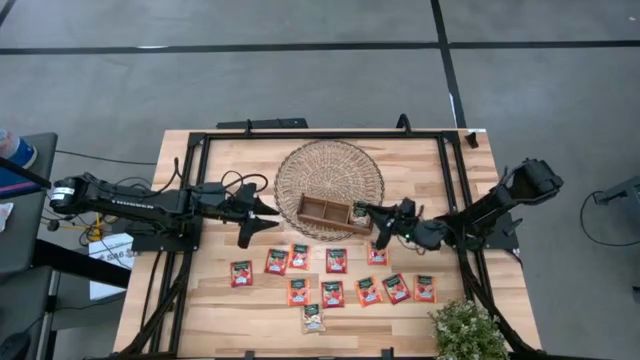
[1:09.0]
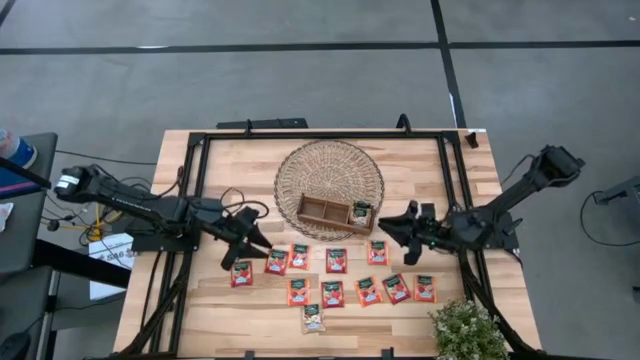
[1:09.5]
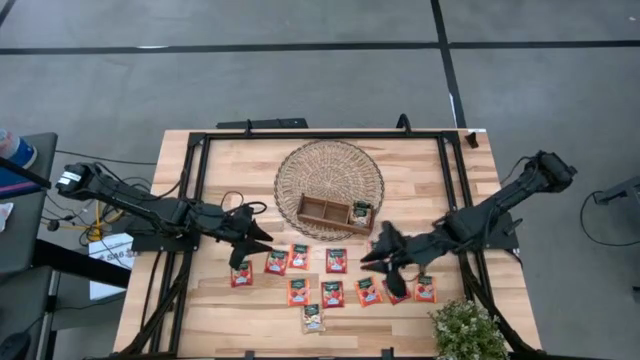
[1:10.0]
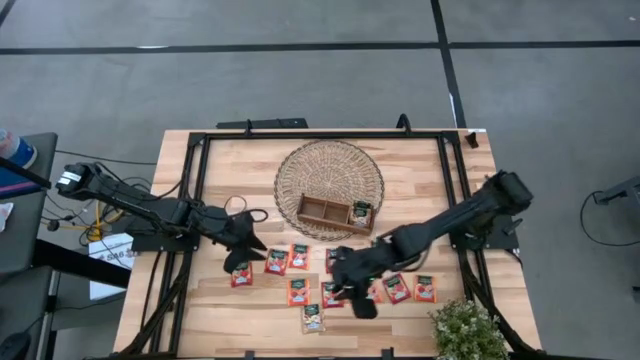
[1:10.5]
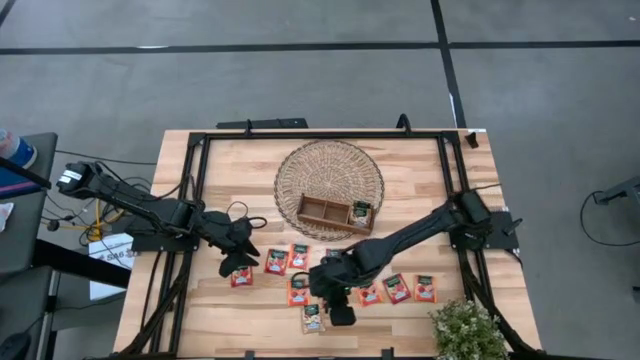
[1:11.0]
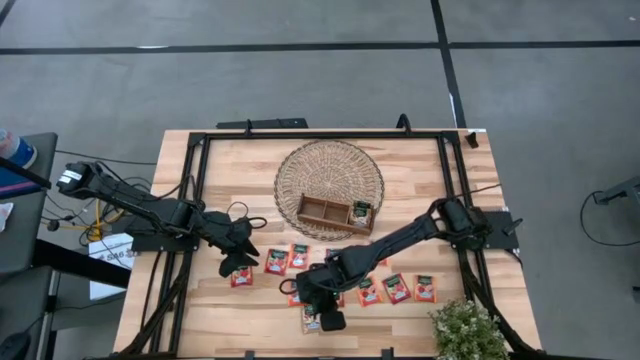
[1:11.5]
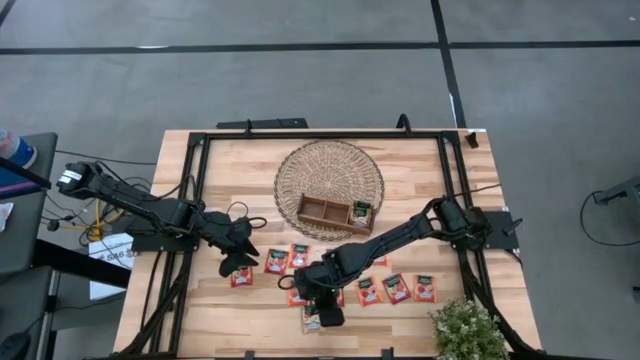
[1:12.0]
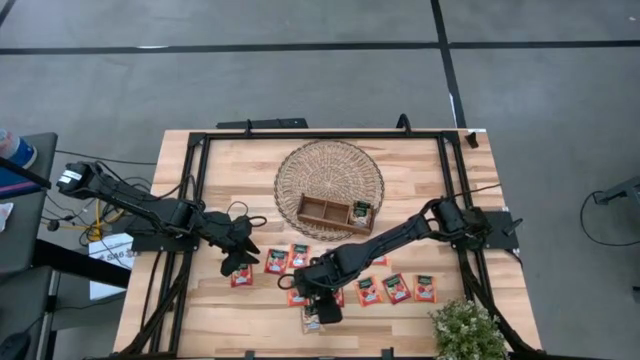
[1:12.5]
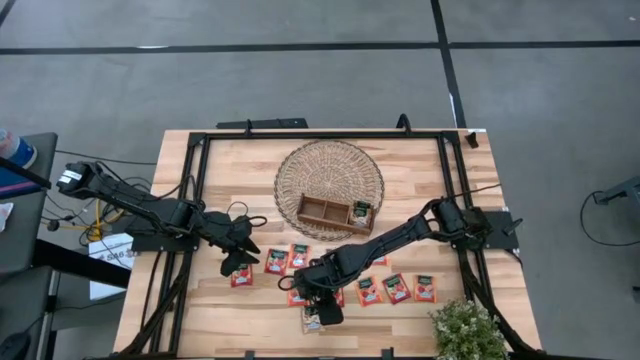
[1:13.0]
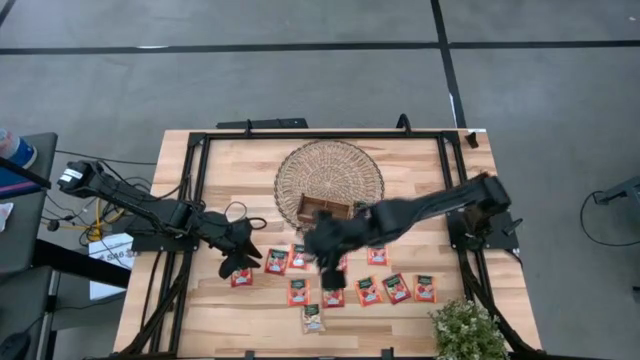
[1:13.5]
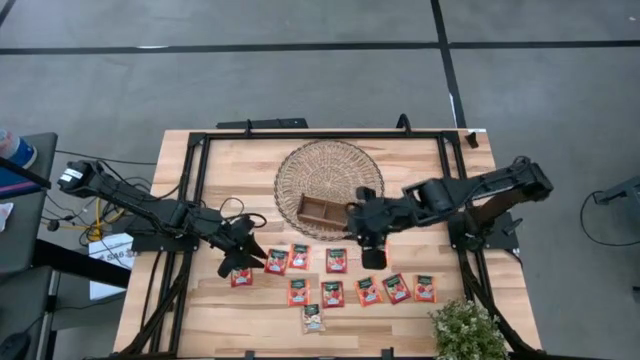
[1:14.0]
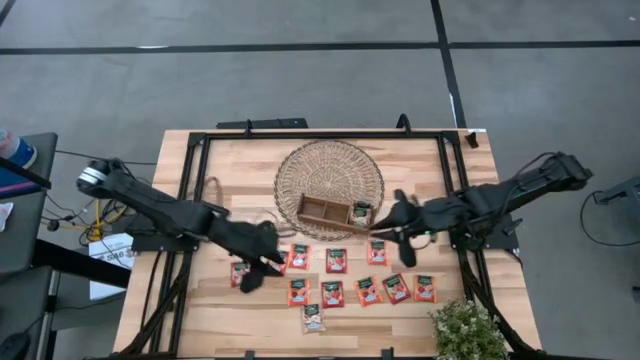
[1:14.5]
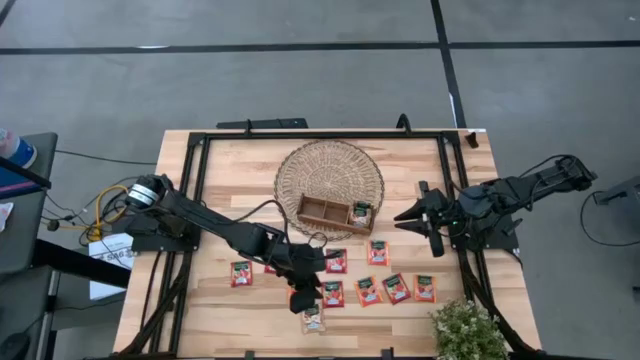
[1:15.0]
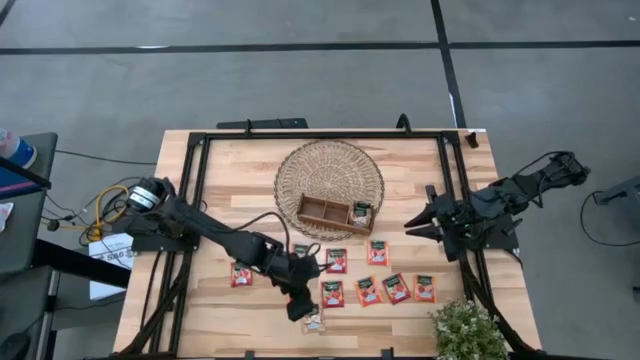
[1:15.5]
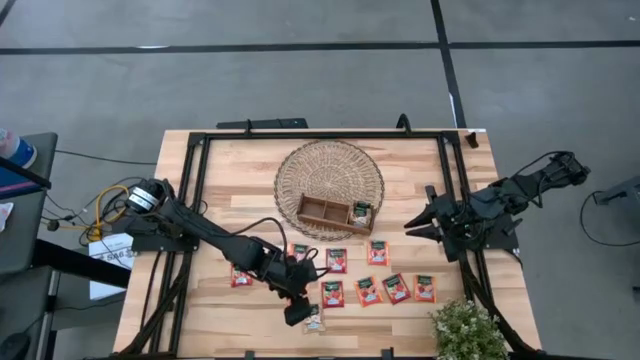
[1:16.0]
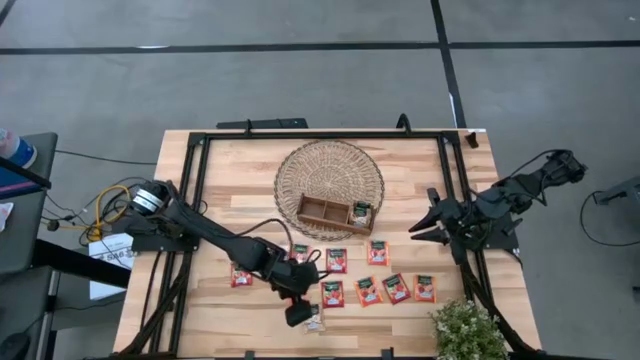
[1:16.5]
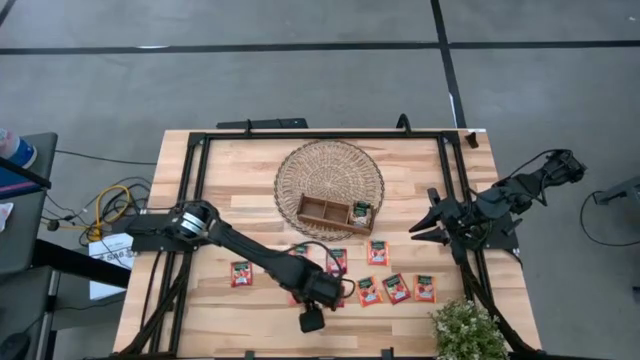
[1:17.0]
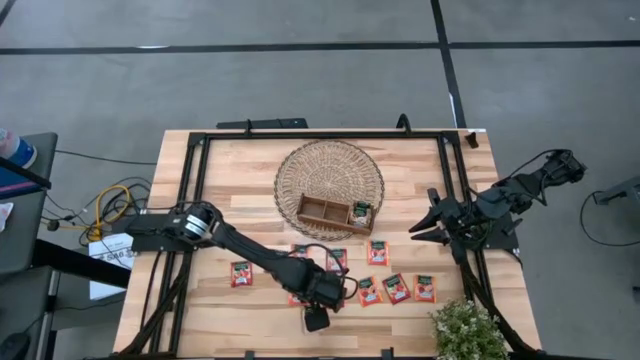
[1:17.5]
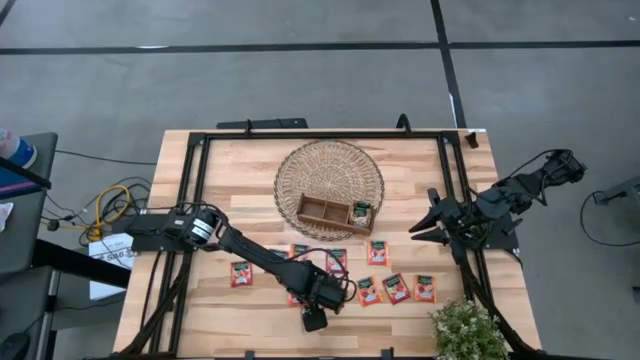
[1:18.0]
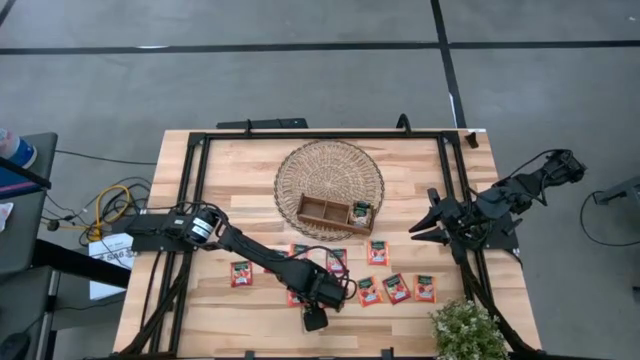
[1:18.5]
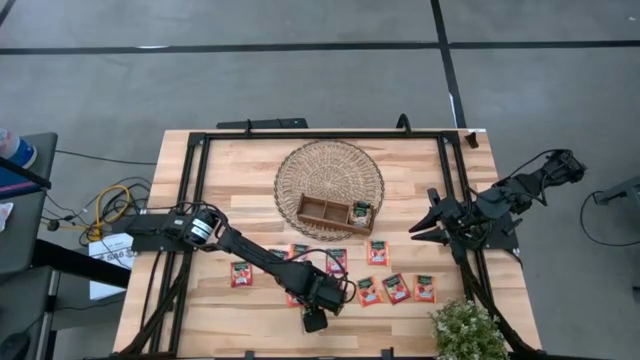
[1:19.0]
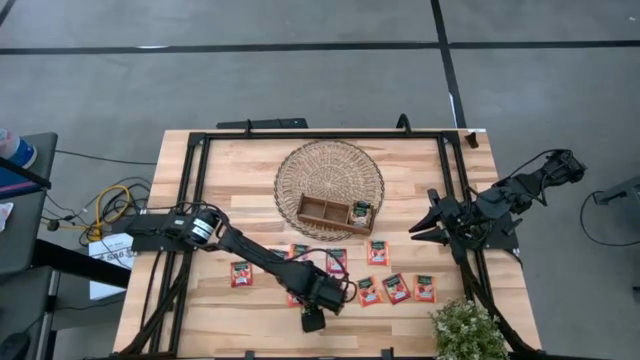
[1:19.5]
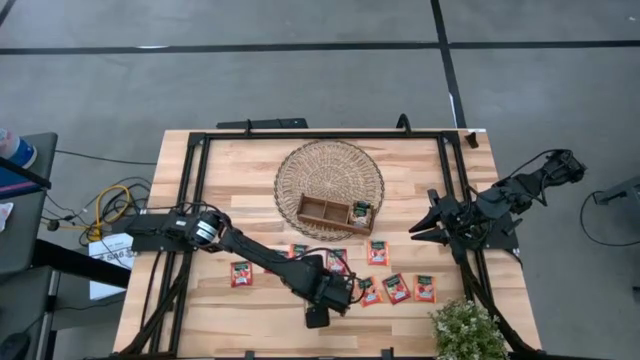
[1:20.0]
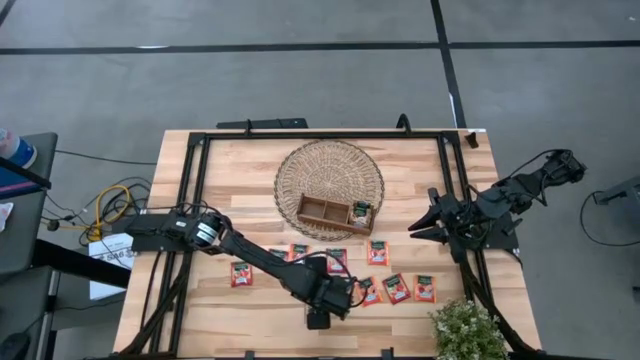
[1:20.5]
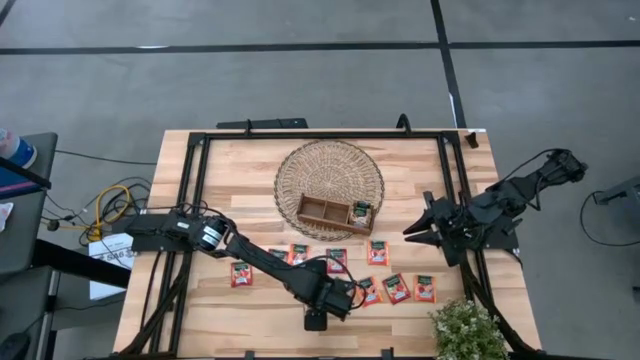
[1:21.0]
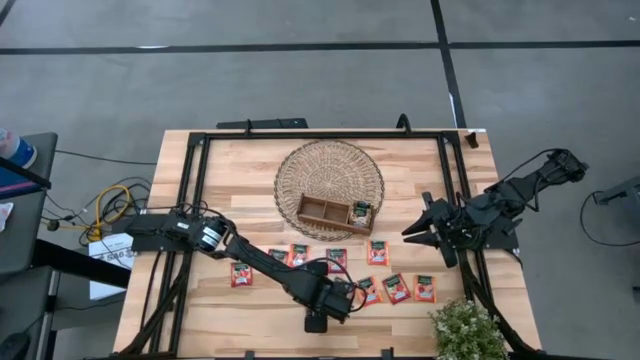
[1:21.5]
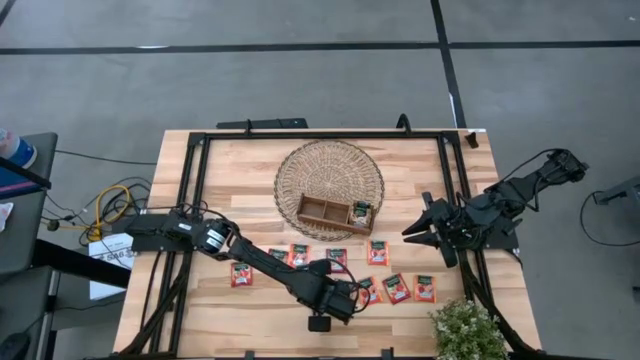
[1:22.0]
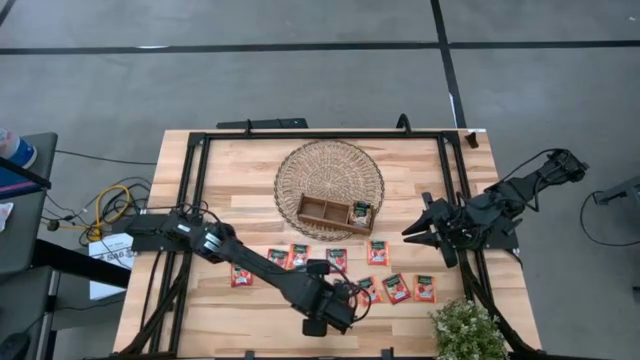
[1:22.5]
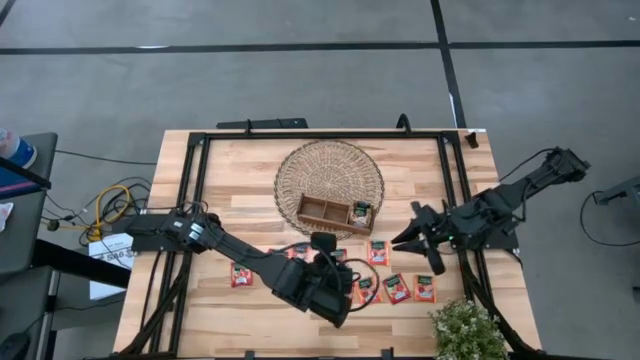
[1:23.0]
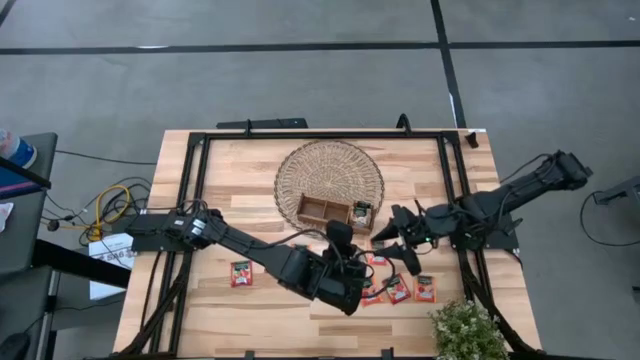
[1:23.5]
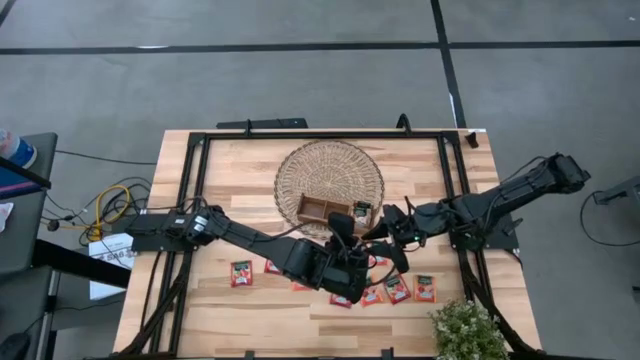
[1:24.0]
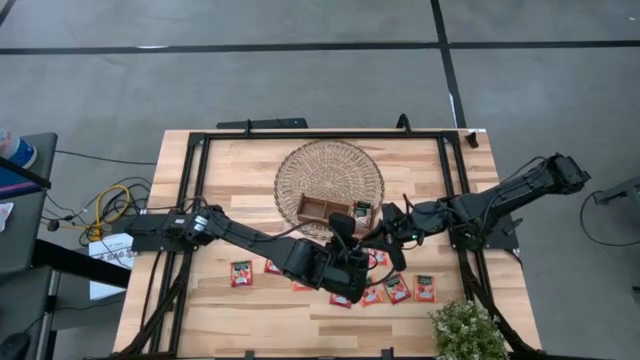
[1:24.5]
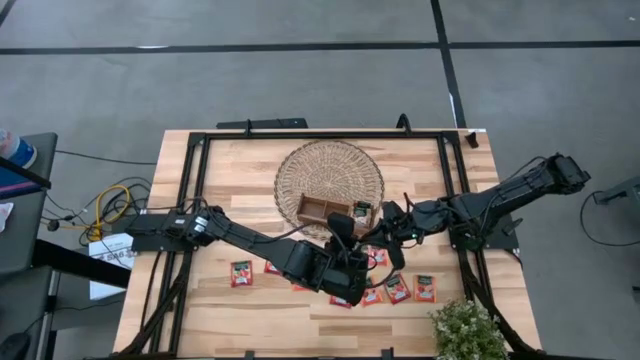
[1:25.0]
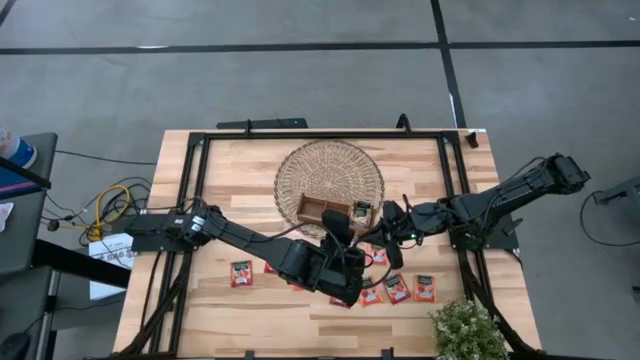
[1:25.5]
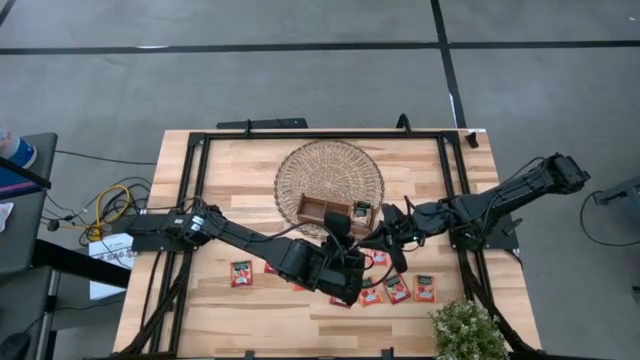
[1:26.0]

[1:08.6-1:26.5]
Task: Pick & Place Tea
Put the brown tea bag into the right section of the wooden organizer
